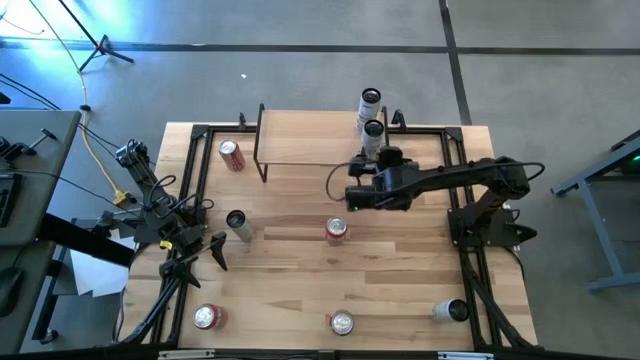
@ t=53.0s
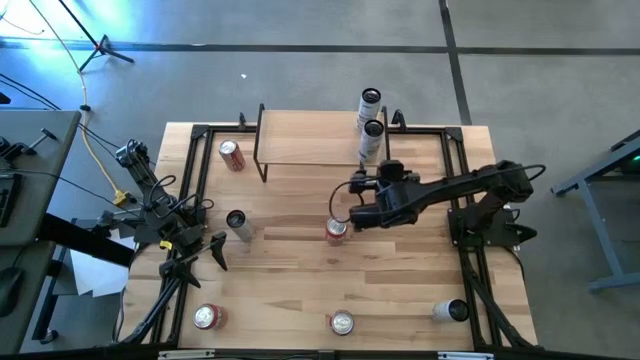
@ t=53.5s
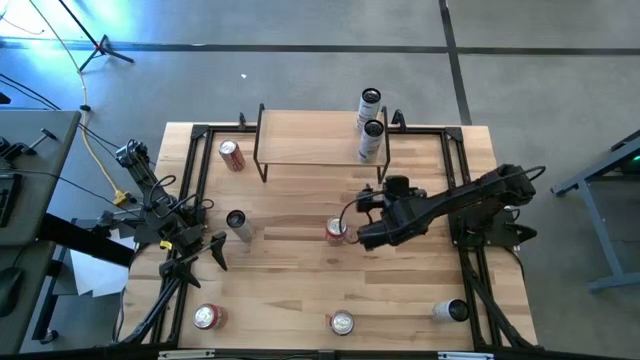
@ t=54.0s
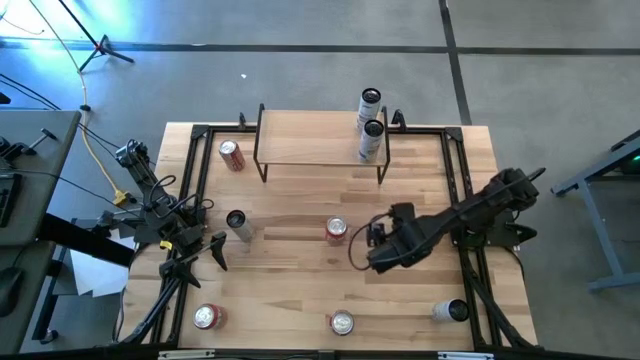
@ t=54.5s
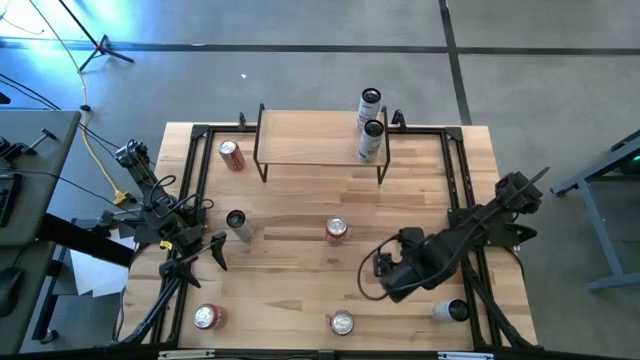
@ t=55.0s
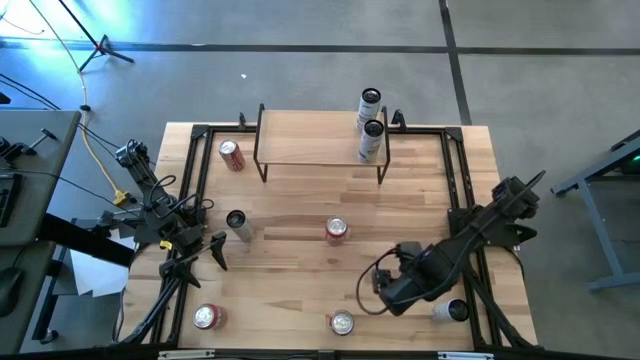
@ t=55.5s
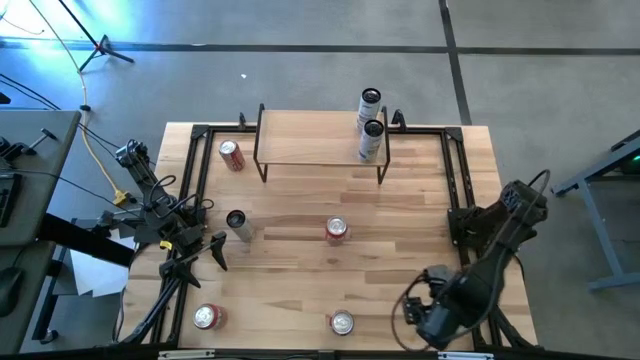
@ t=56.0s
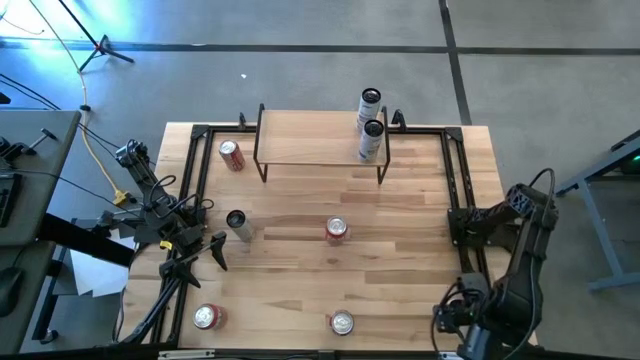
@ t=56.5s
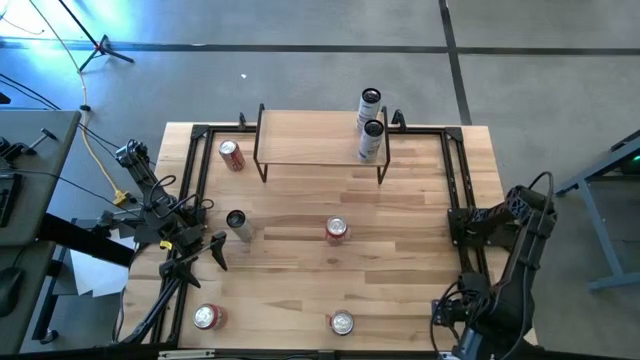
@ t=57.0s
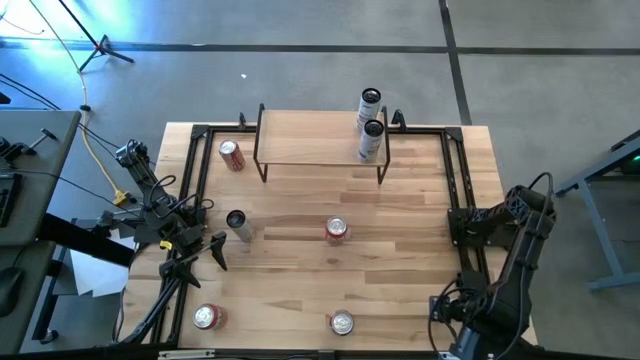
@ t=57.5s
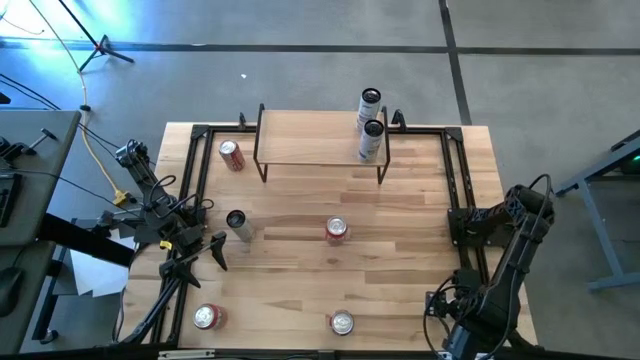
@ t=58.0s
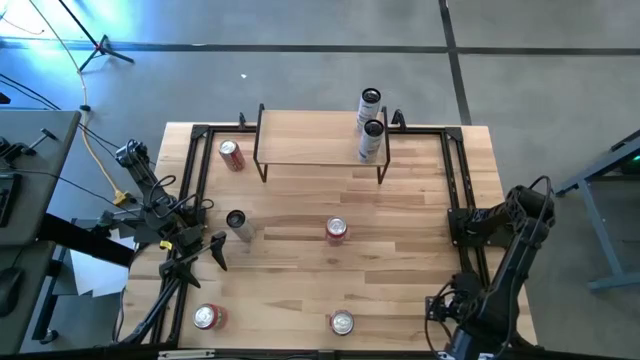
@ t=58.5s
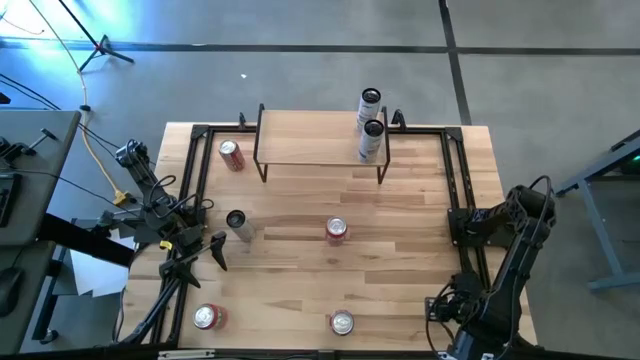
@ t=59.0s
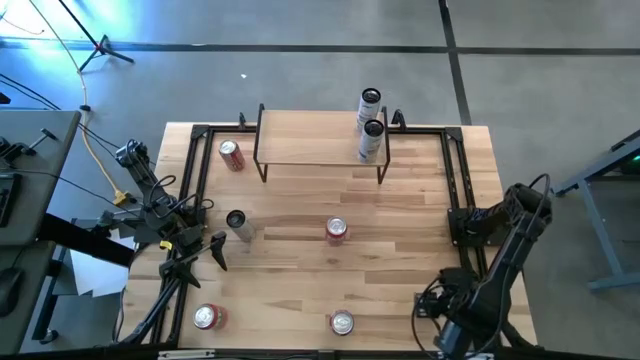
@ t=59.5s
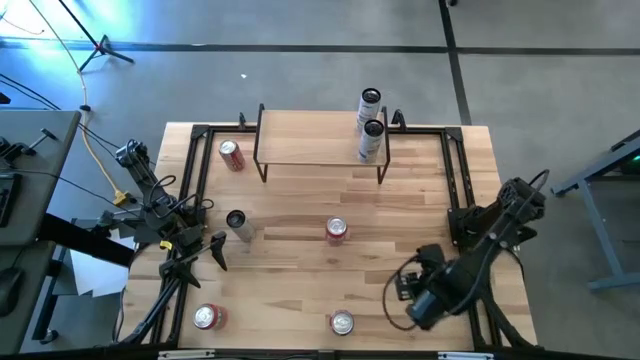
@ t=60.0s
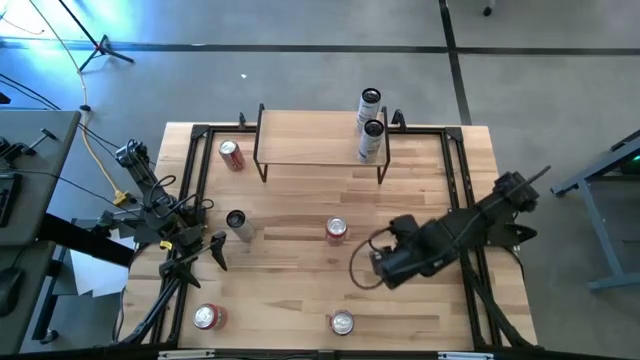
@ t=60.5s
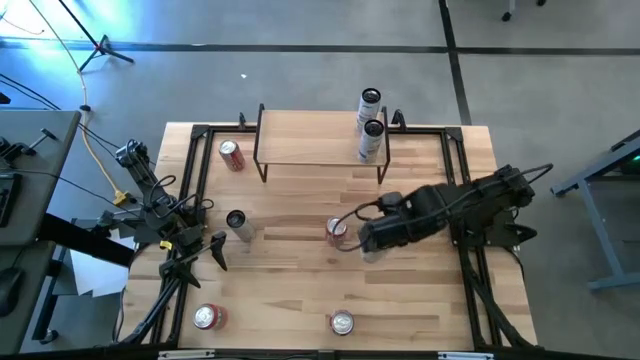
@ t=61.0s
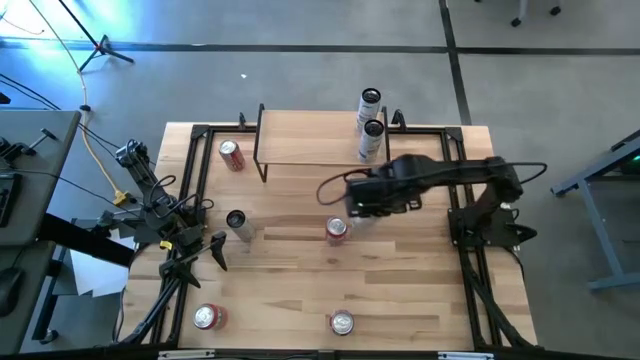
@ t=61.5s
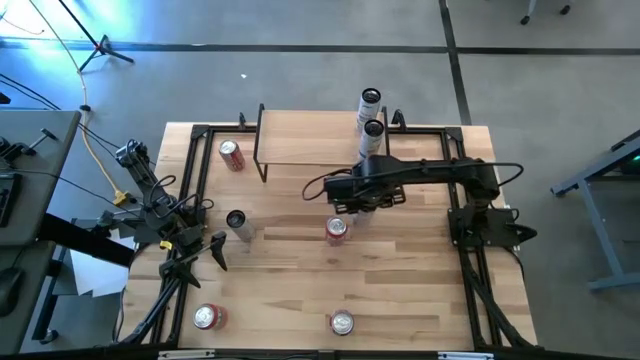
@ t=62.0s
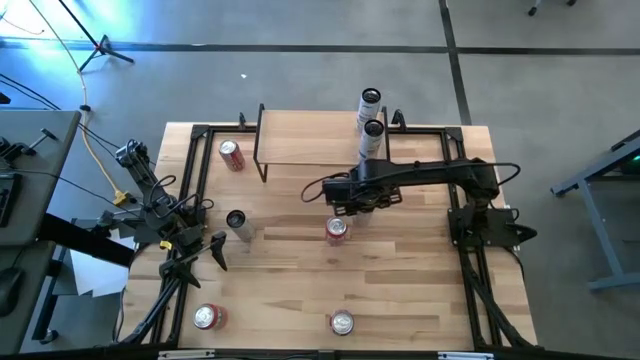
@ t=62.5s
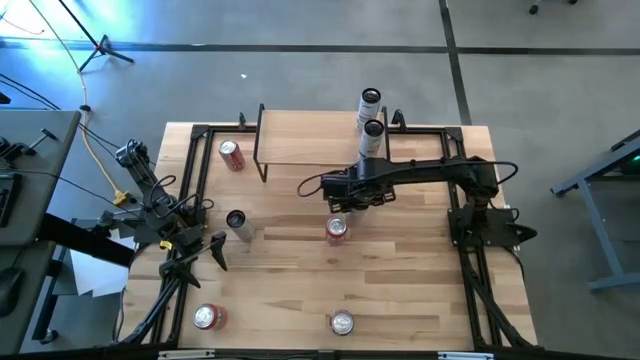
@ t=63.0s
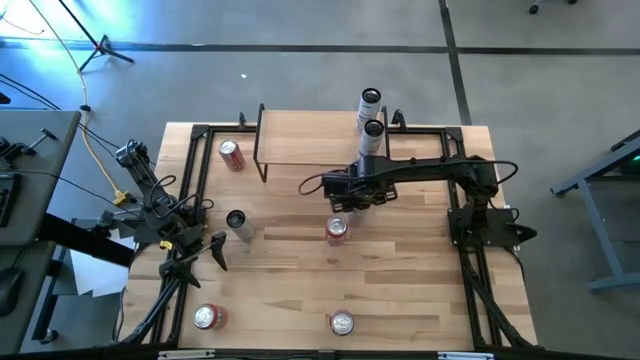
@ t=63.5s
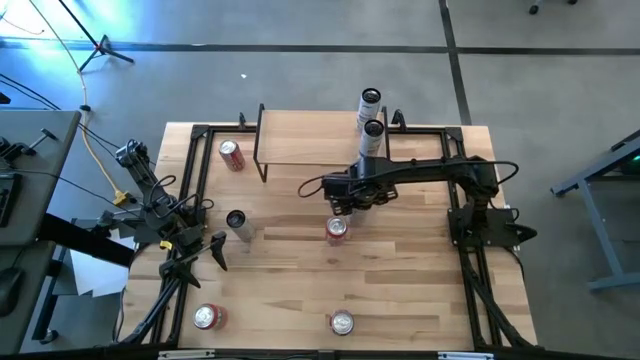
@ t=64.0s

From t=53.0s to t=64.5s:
Task: Place canned beverage on shelf
Move the bottom white yellow soda can to the center of the table

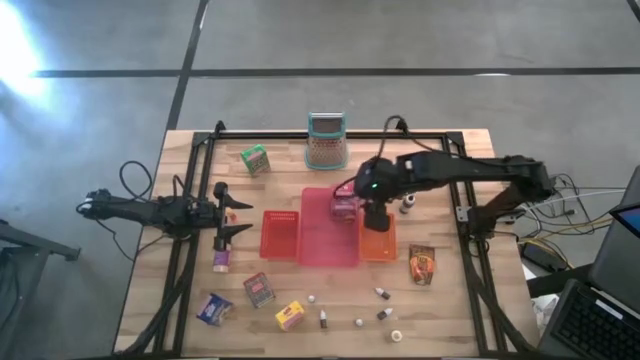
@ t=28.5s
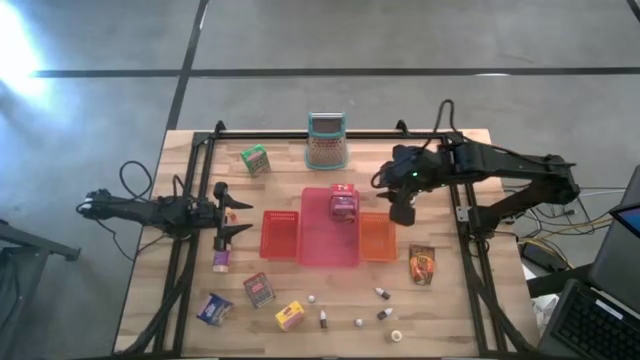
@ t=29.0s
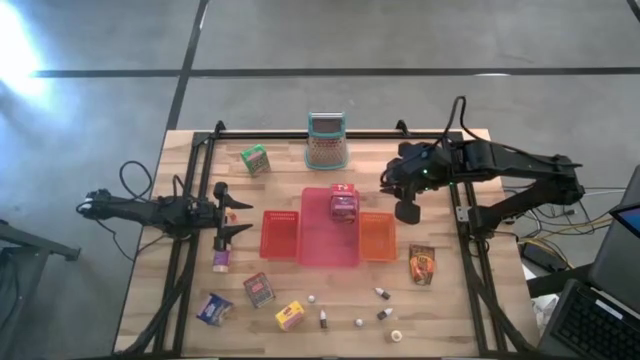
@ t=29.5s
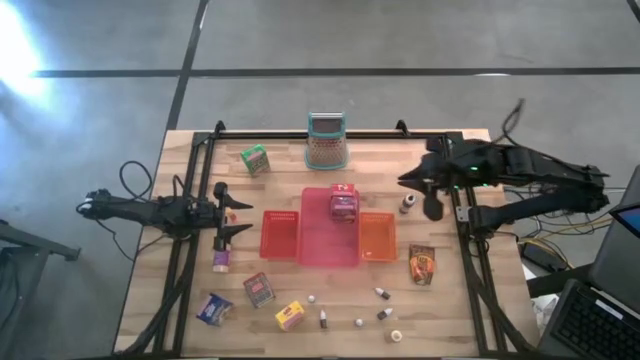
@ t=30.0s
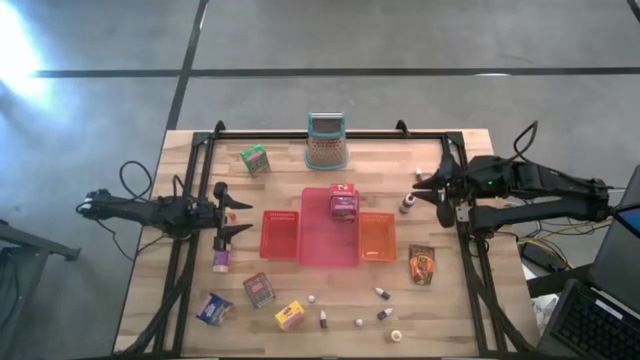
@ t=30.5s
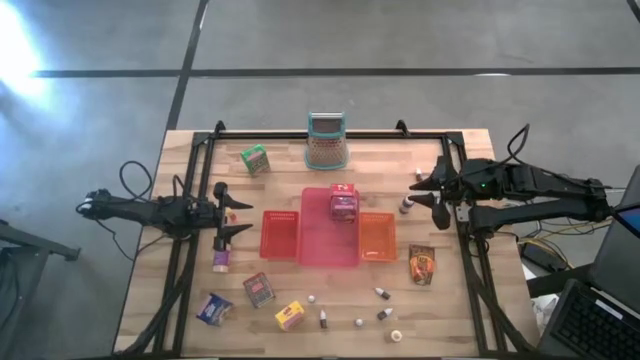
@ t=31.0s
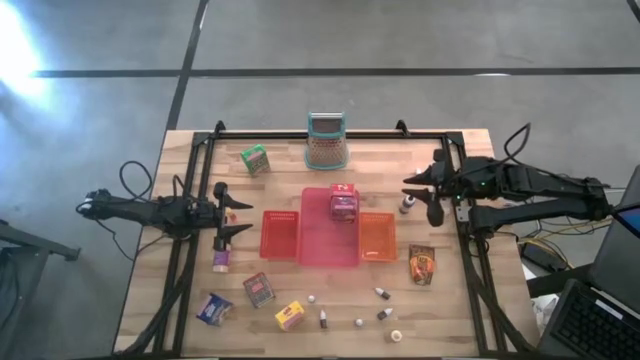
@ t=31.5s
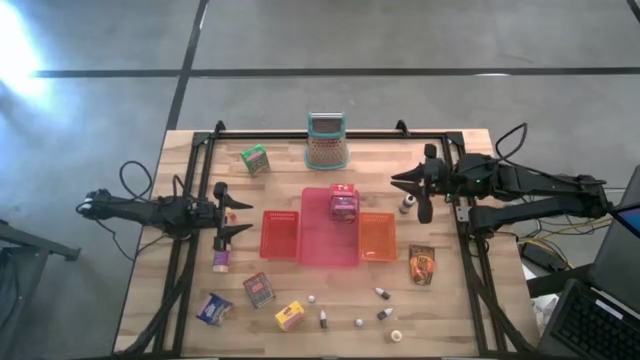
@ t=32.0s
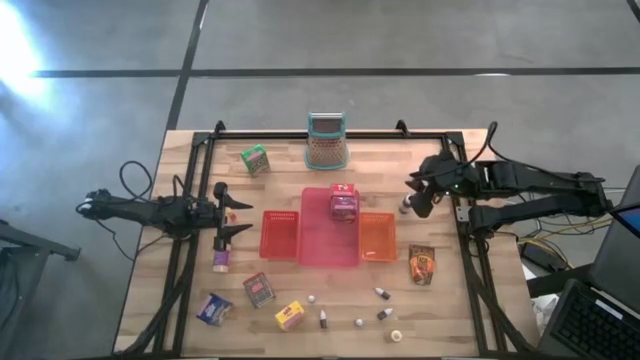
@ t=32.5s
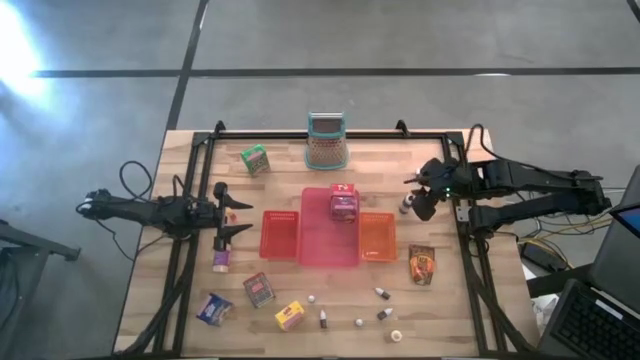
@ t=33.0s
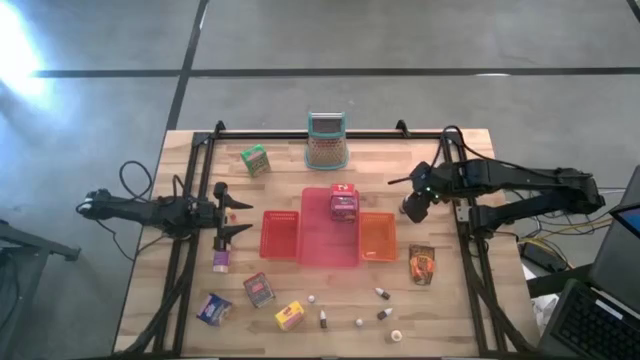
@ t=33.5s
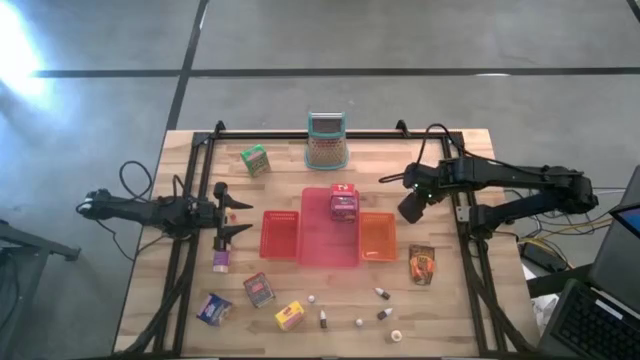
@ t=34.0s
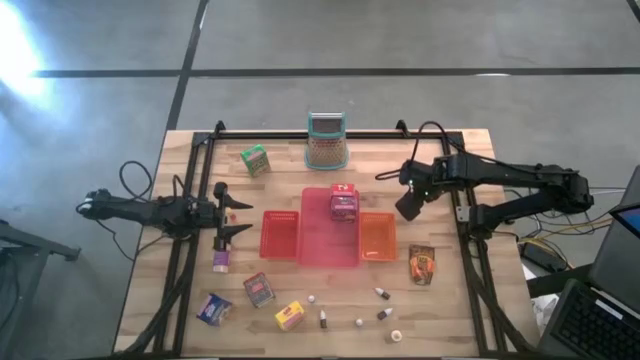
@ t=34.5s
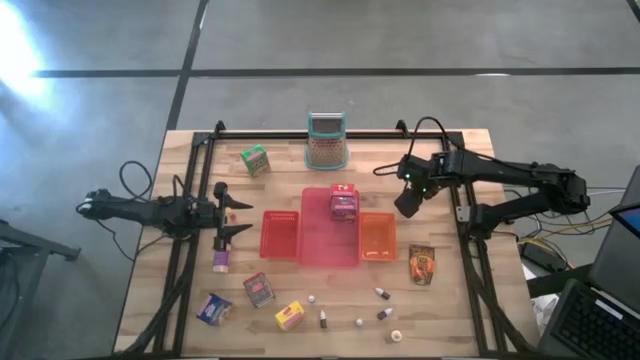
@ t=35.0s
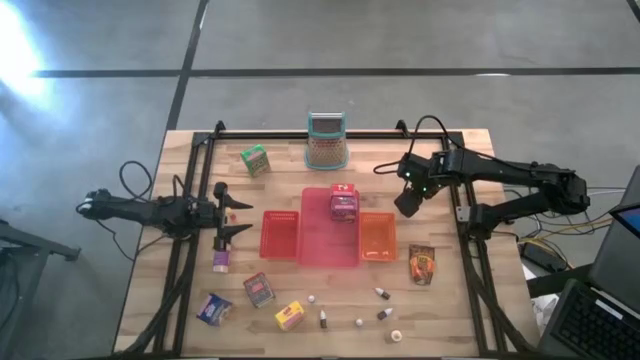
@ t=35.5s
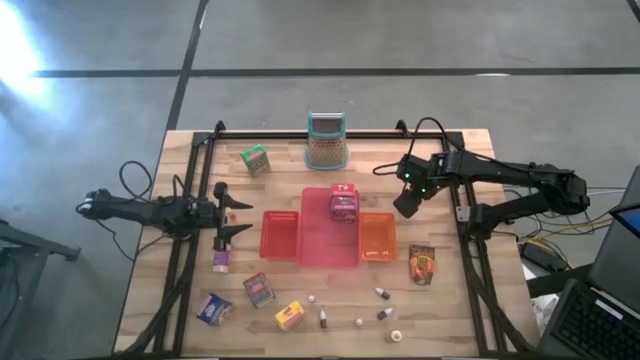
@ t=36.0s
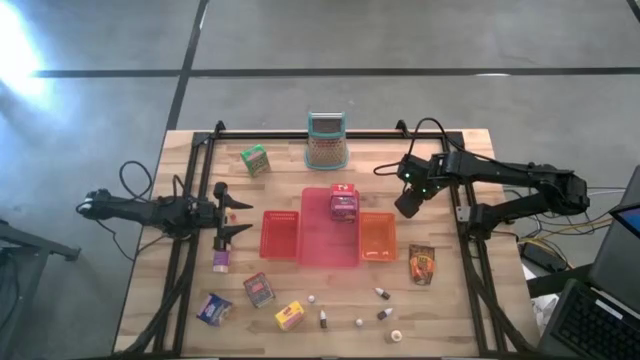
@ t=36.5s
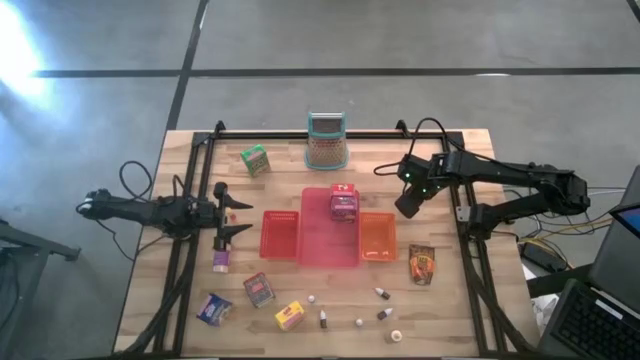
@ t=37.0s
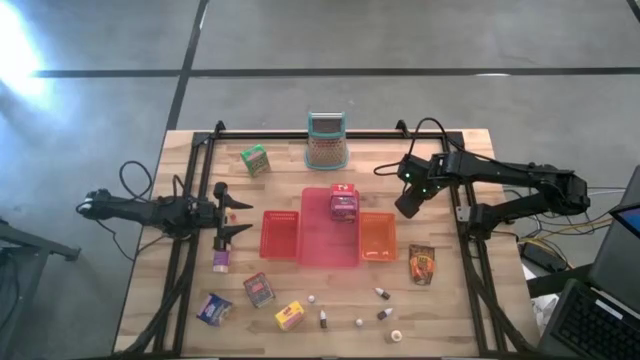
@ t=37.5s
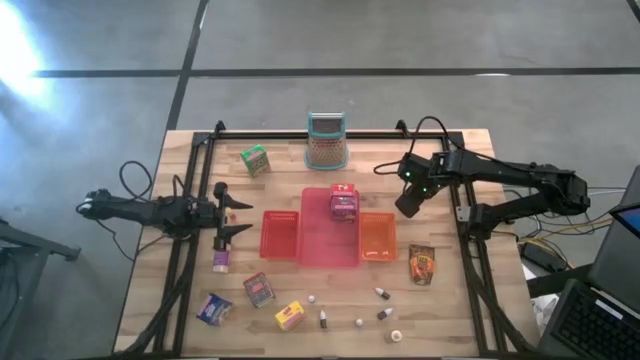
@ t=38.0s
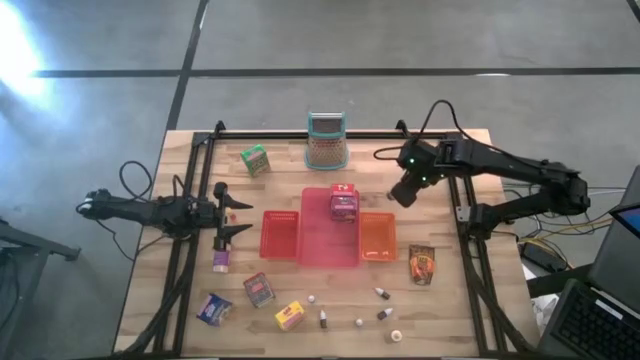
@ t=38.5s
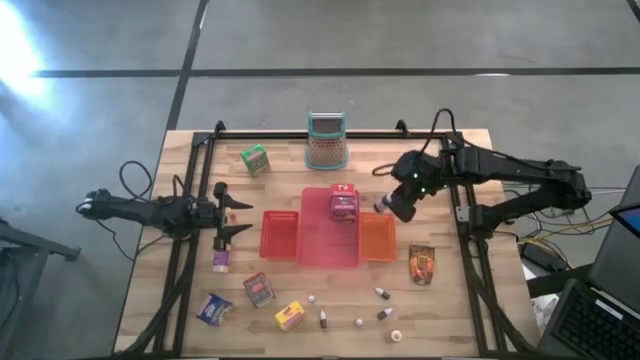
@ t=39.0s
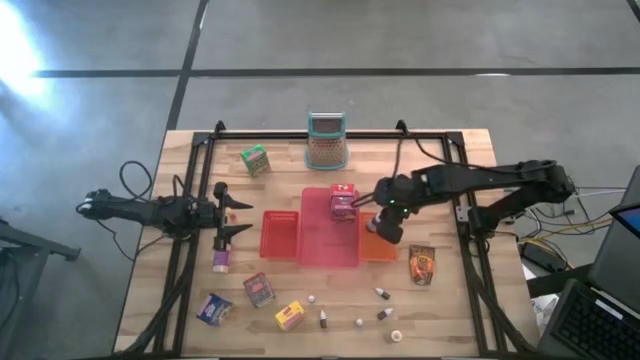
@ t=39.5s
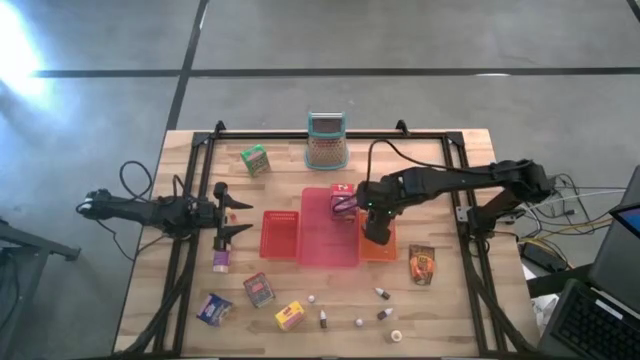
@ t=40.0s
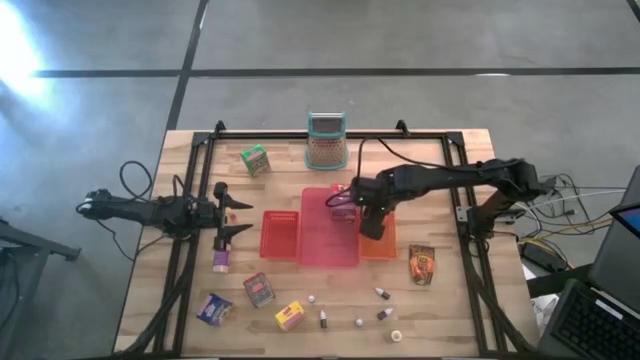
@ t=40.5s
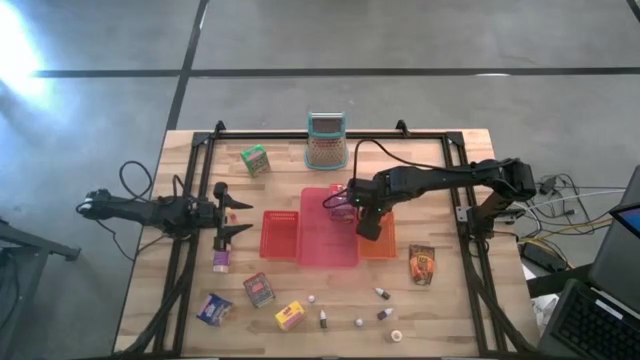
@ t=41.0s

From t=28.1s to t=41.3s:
Task: Pick & Place Kitchen Items
Put the big black food coloring bottle into the orange bin
